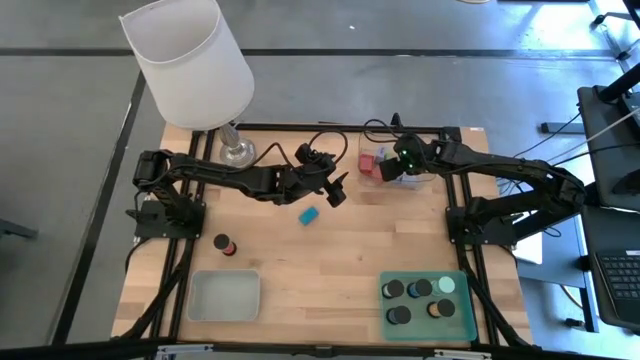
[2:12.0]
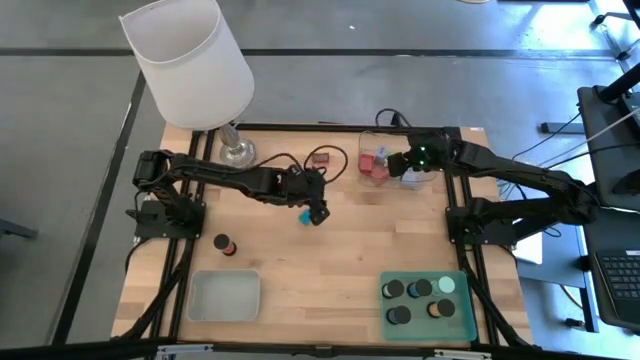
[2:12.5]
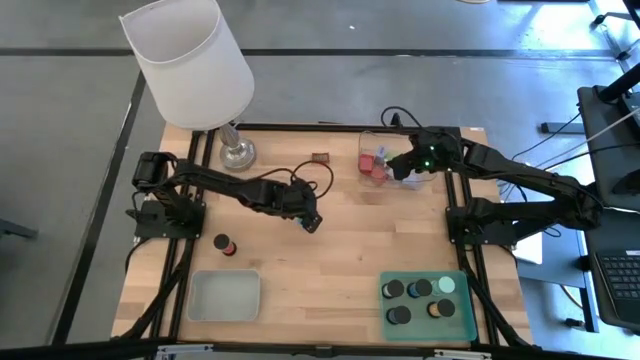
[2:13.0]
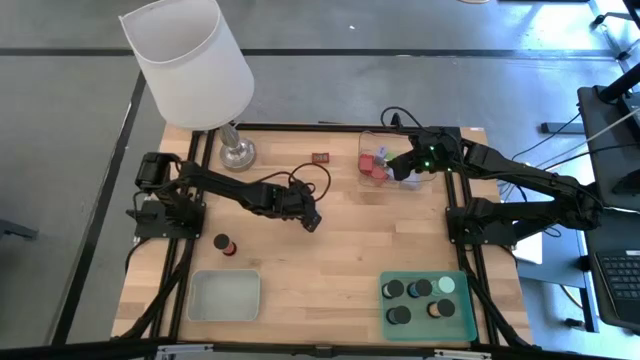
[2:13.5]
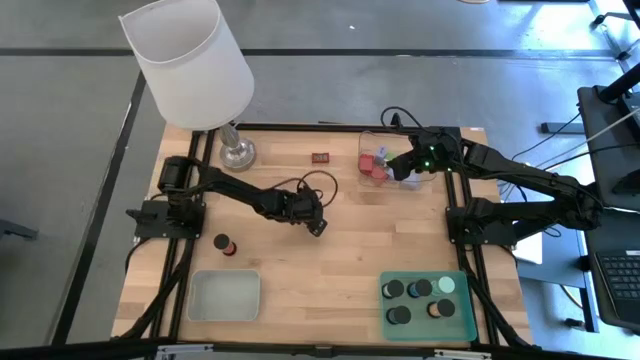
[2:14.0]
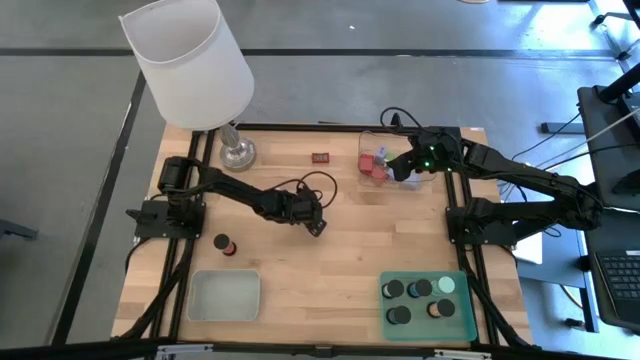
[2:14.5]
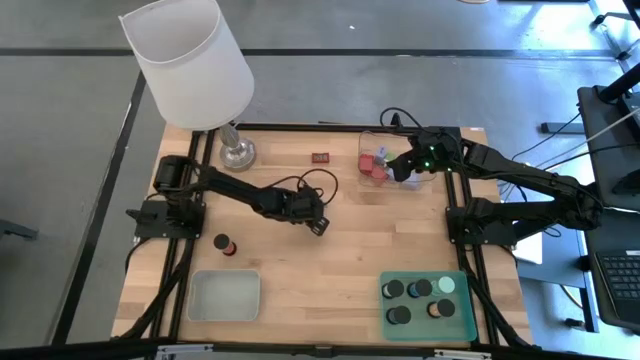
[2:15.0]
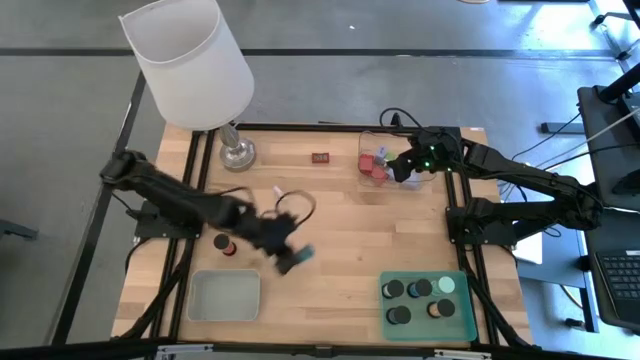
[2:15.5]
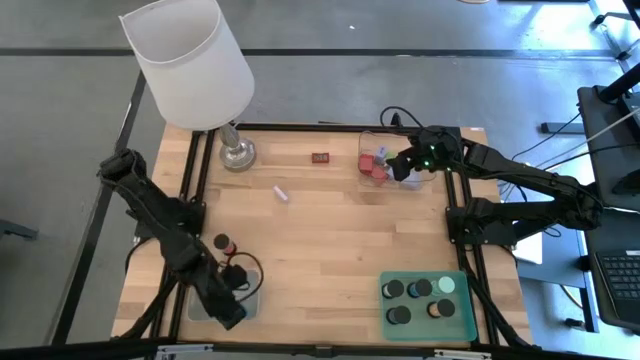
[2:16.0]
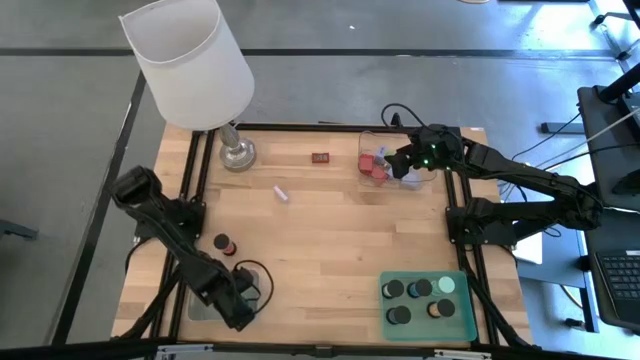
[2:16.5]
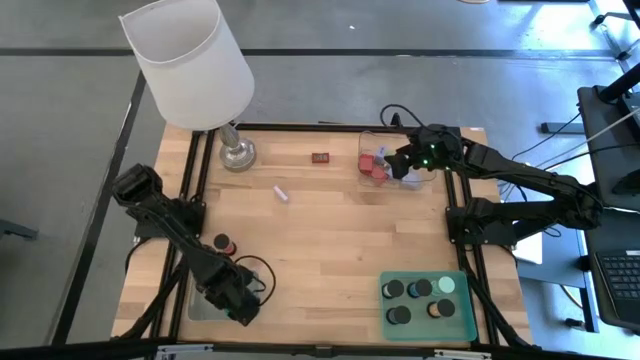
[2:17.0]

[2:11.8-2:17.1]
Task: Pick & Place Office items
Put the blue timer into the gray bin

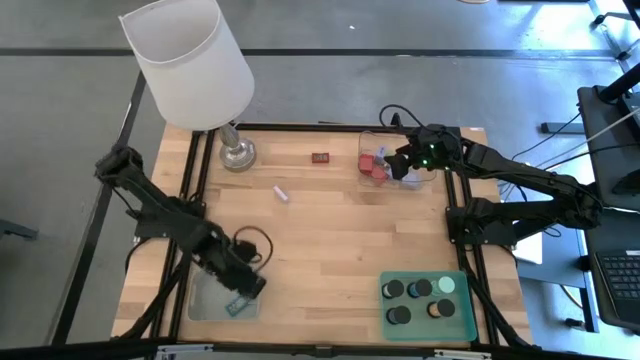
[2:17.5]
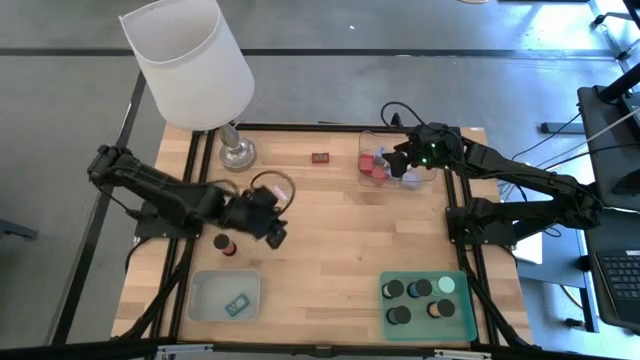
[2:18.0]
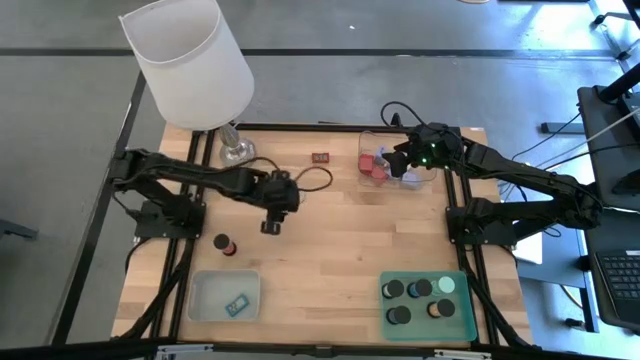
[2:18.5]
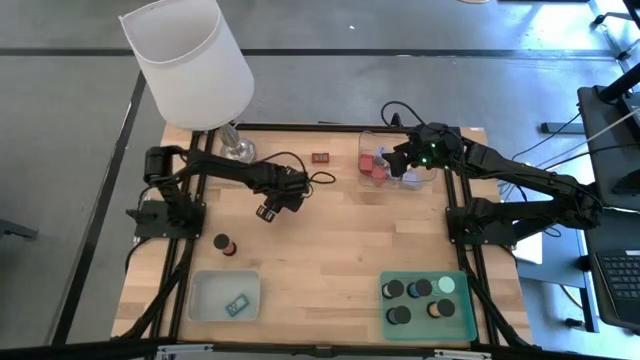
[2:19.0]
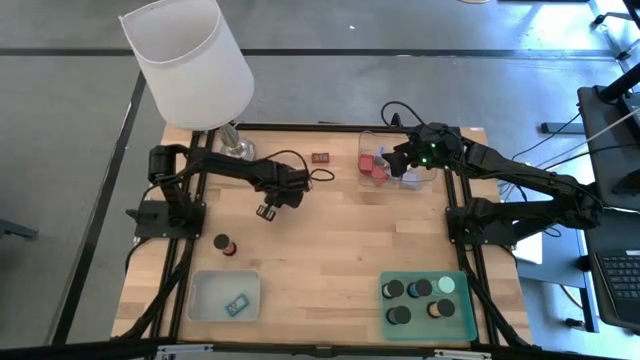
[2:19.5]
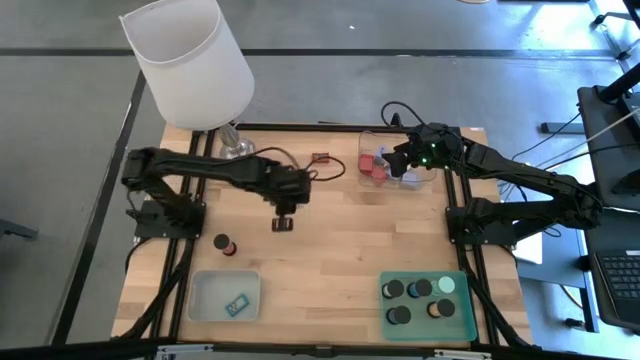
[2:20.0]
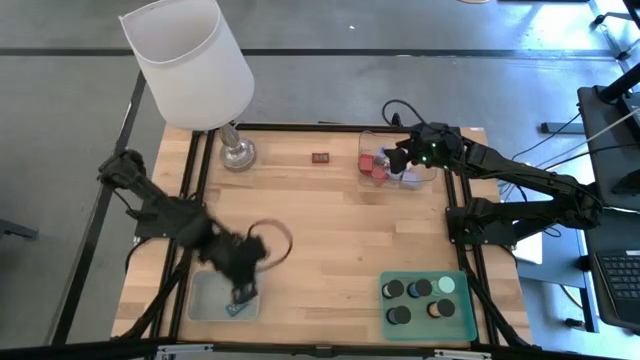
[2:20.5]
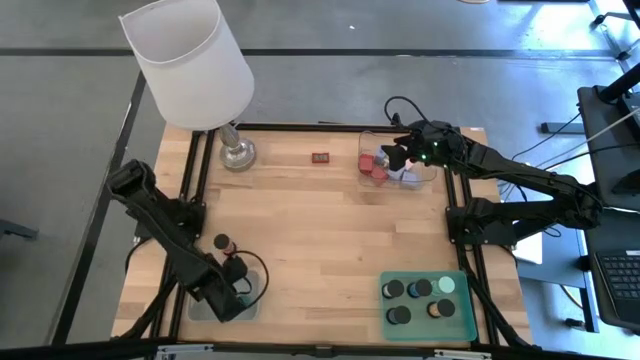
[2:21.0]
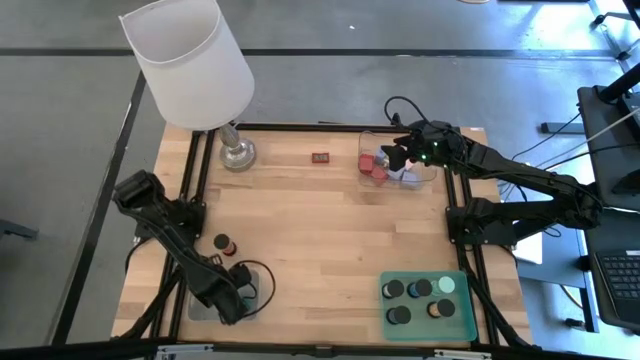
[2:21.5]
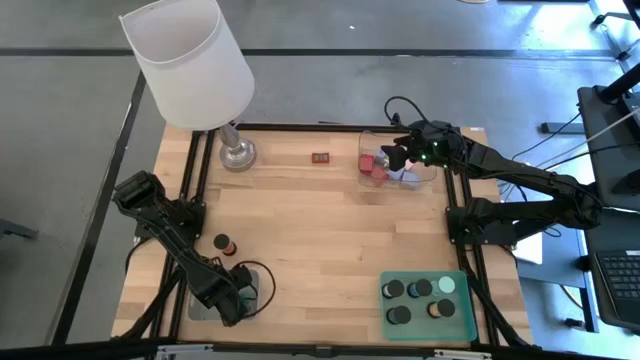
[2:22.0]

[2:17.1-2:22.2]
Put the white timer into the gray bin

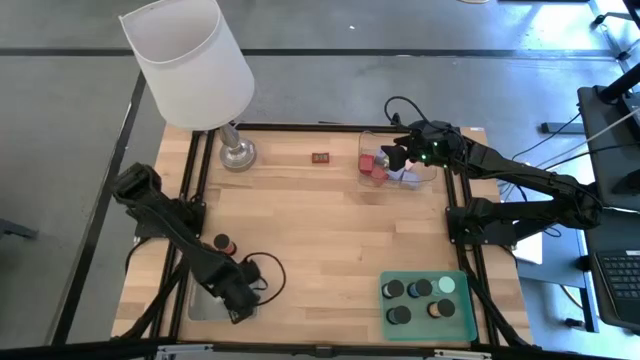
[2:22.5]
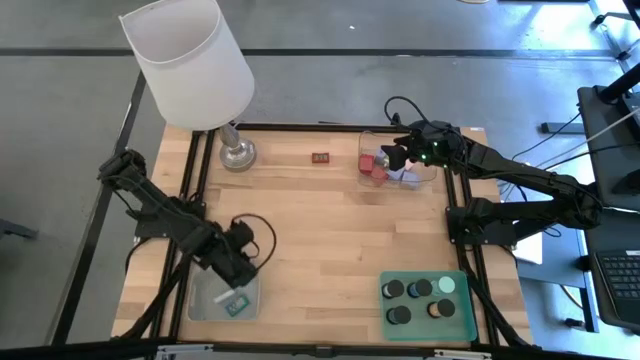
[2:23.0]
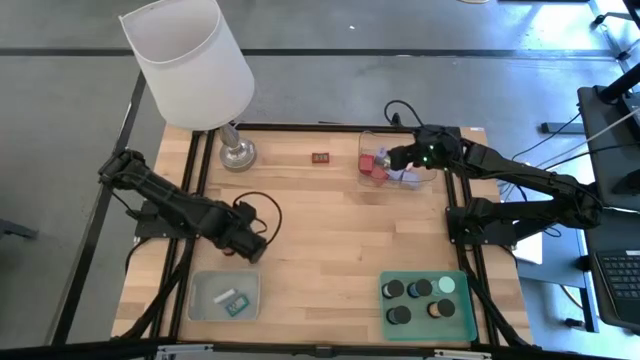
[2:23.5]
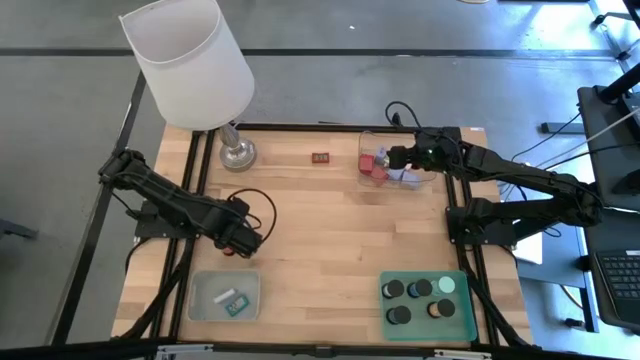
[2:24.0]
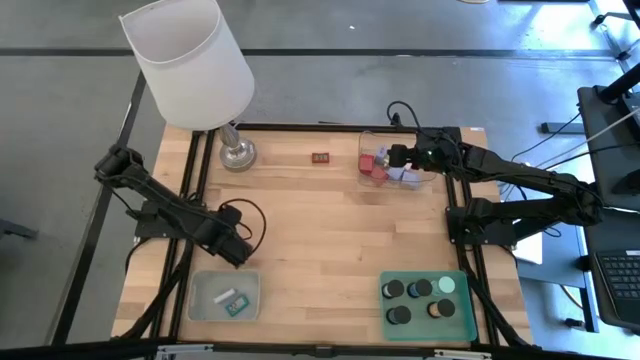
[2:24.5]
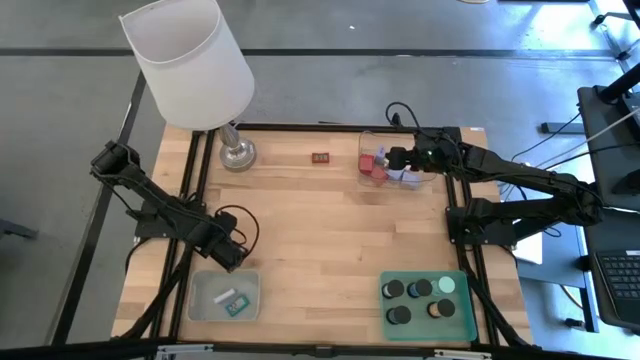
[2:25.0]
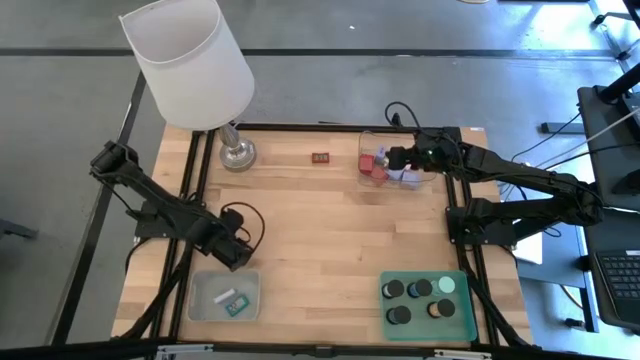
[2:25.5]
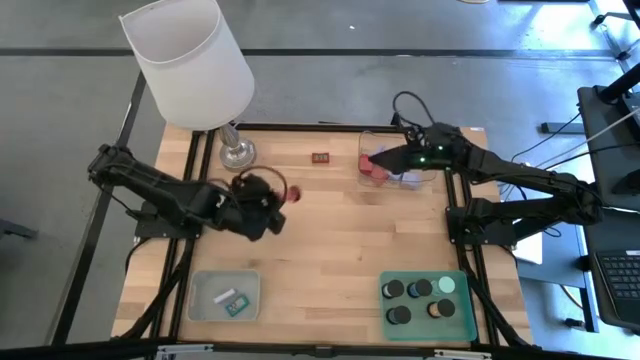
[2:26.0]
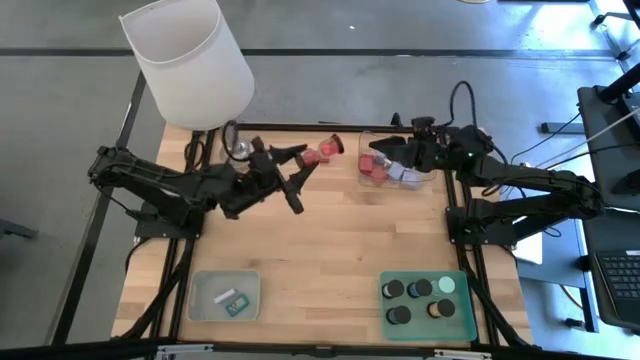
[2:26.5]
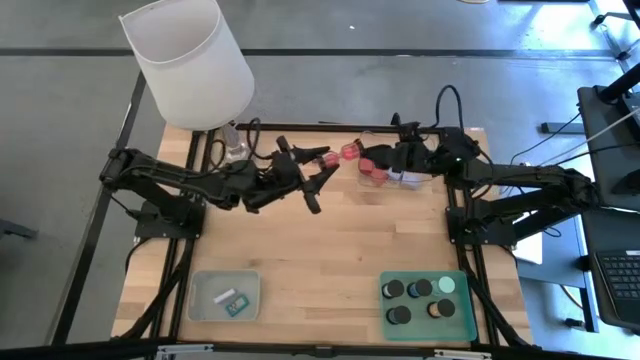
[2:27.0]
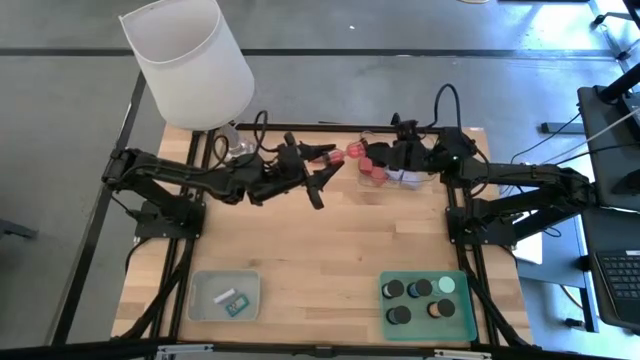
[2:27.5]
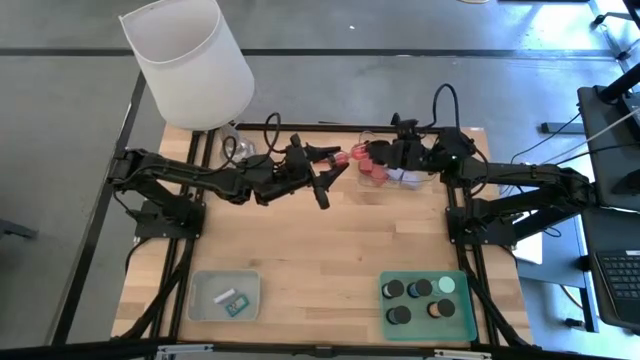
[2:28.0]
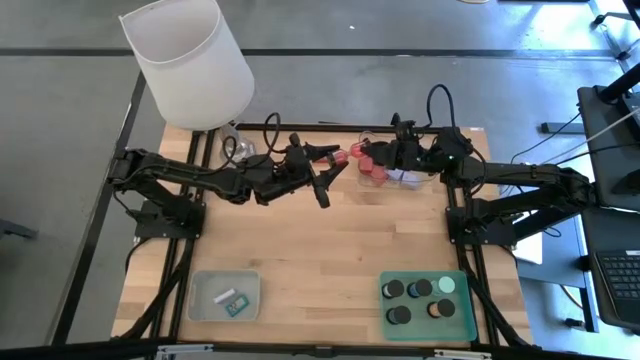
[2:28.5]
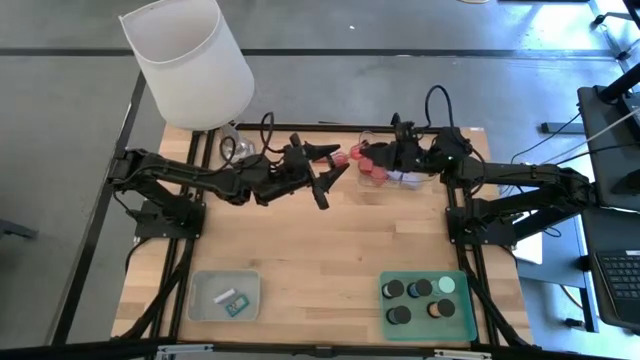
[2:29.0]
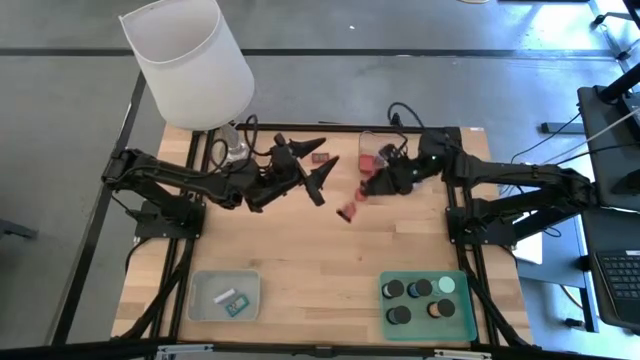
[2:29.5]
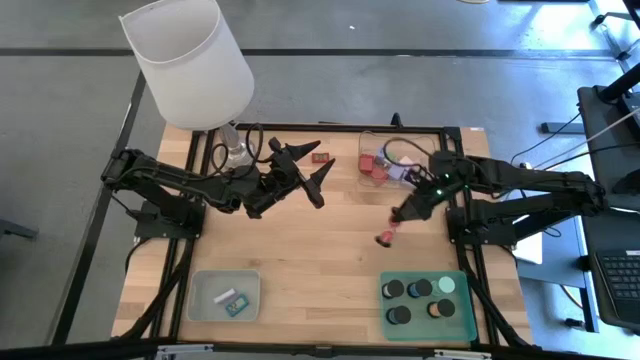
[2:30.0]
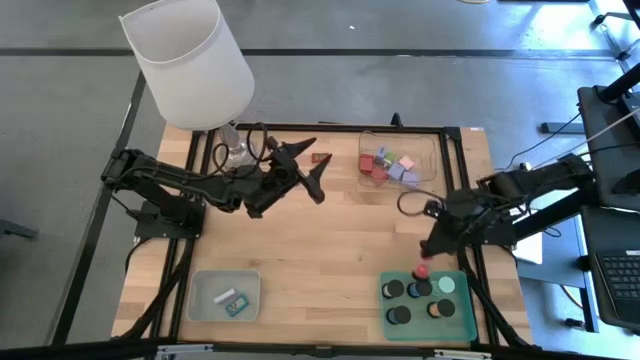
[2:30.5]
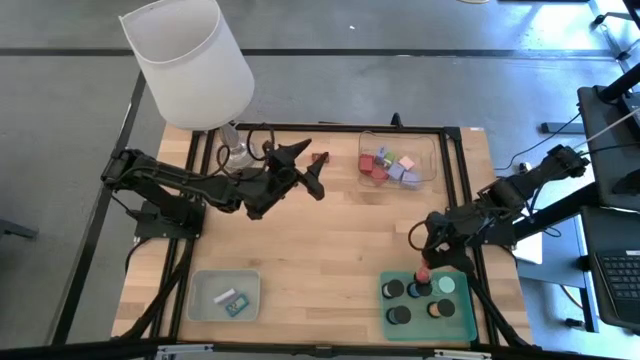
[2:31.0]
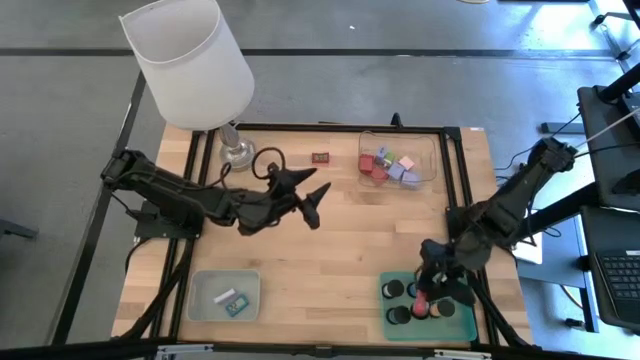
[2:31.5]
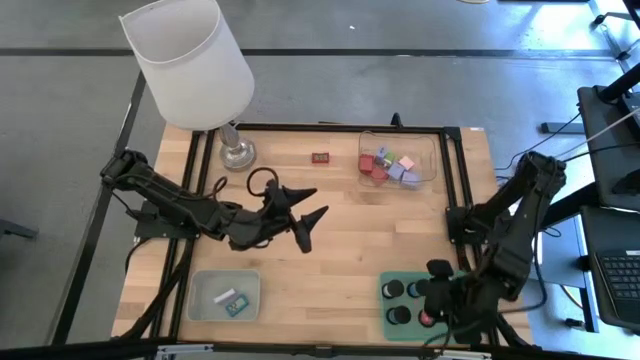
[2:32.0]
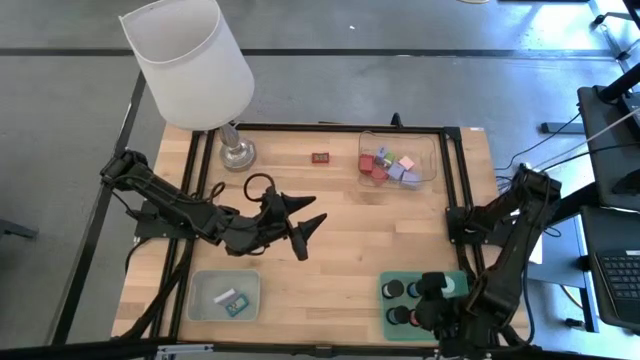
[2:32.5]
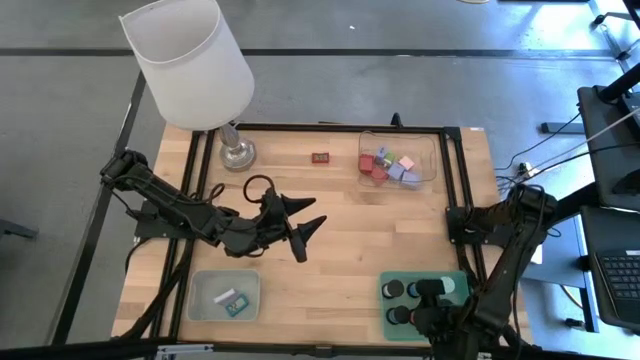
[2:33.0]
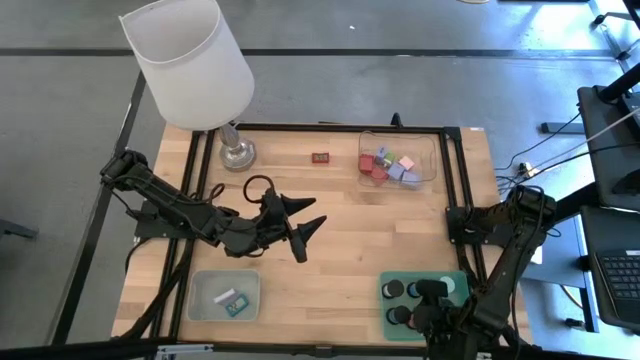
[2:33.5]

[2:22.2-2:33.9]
Put the red hourglass into the green bin
